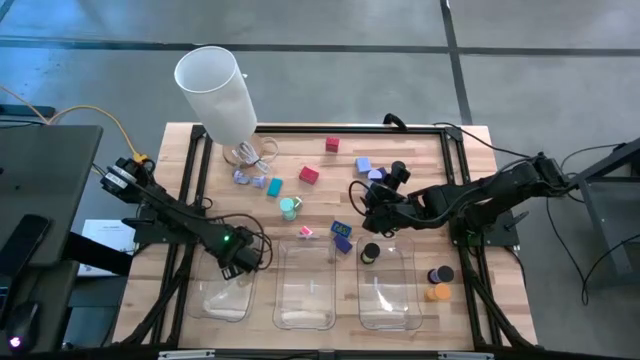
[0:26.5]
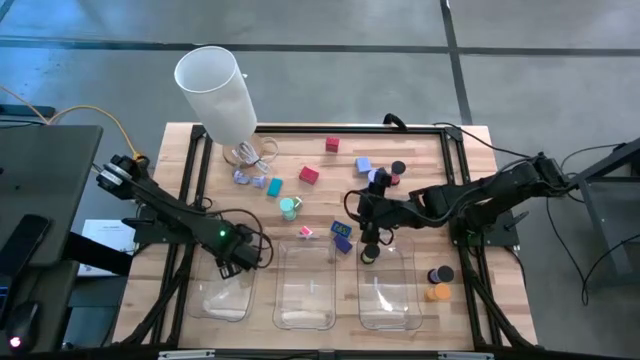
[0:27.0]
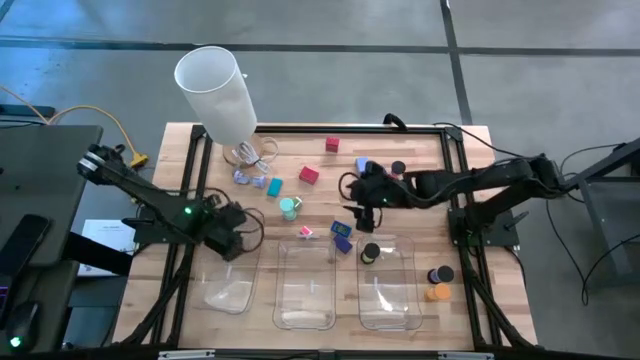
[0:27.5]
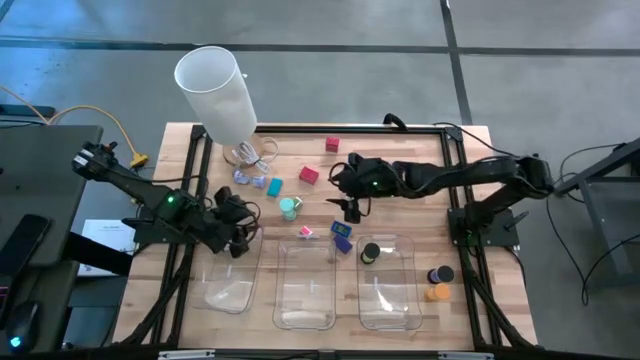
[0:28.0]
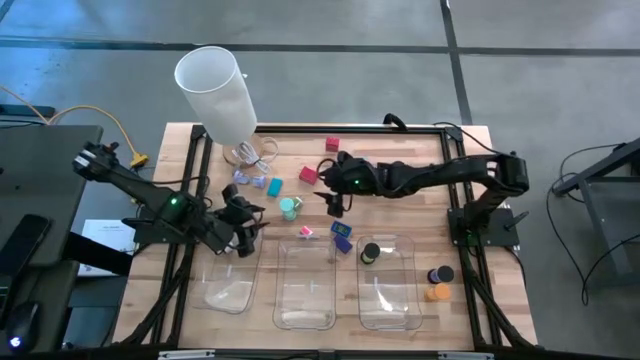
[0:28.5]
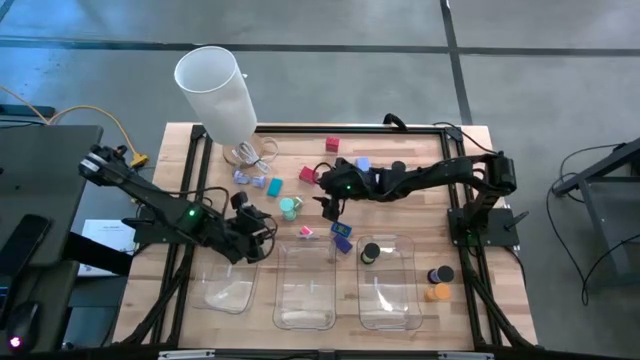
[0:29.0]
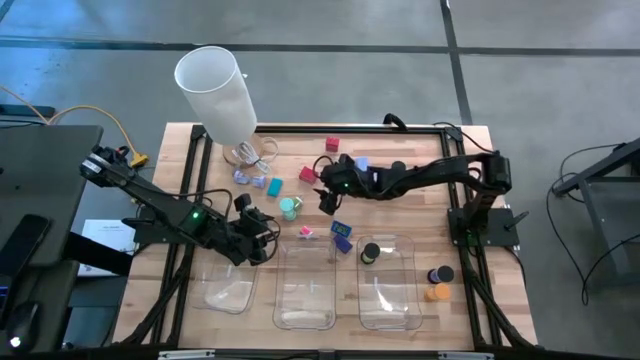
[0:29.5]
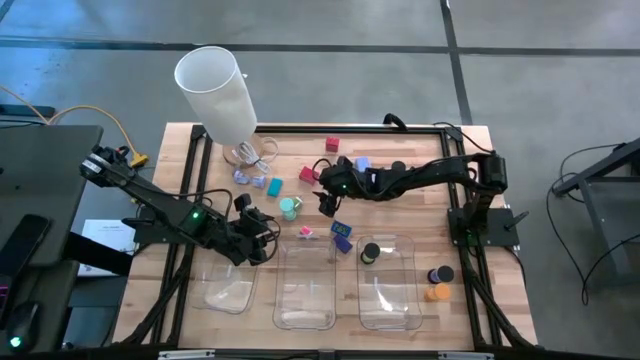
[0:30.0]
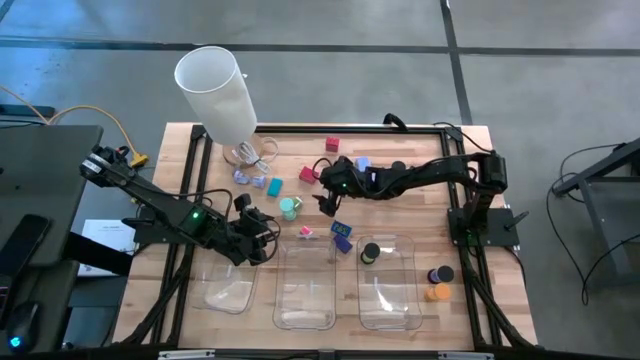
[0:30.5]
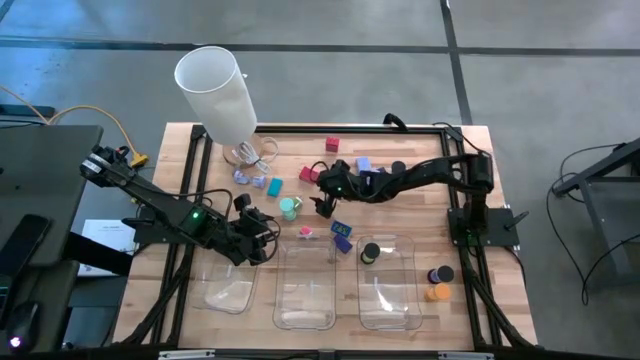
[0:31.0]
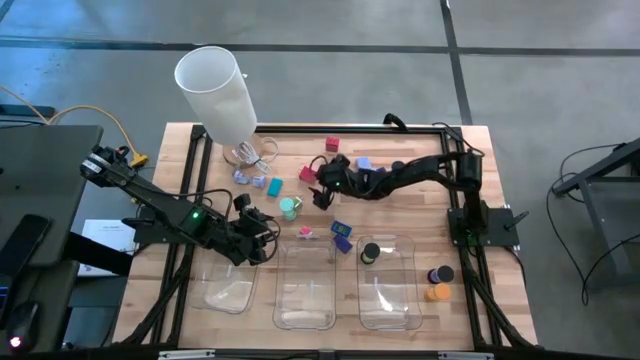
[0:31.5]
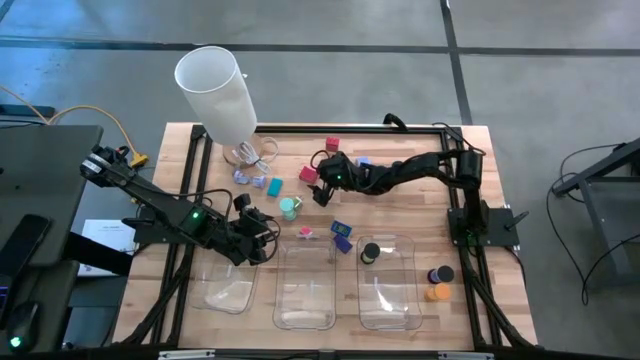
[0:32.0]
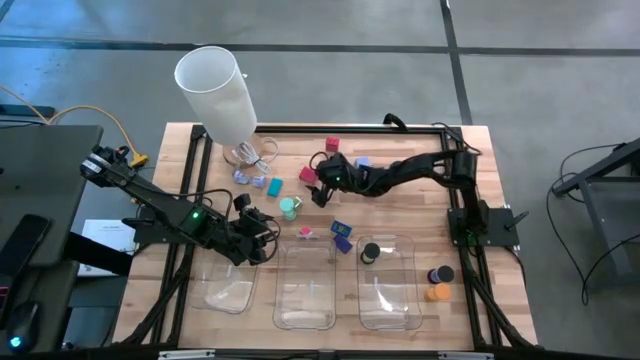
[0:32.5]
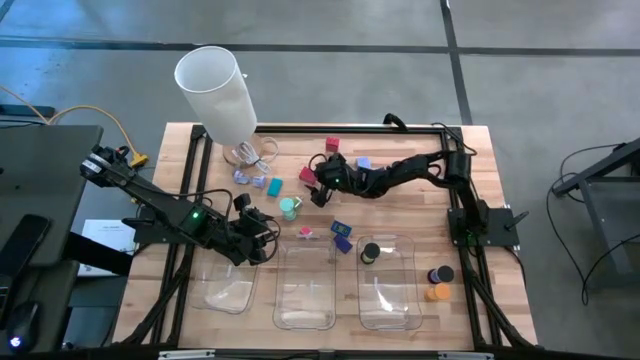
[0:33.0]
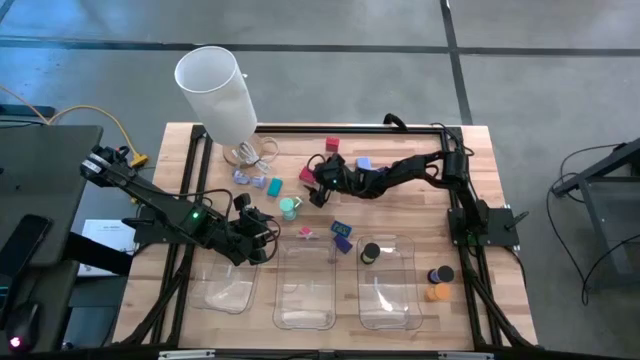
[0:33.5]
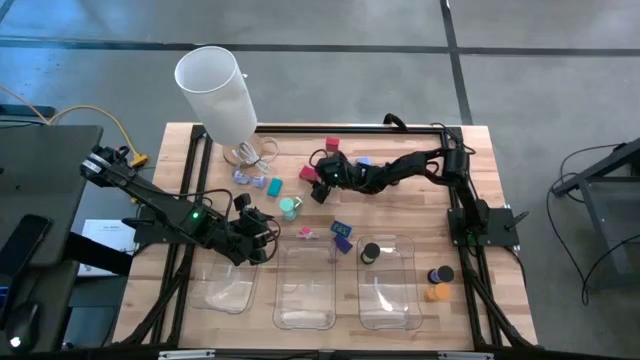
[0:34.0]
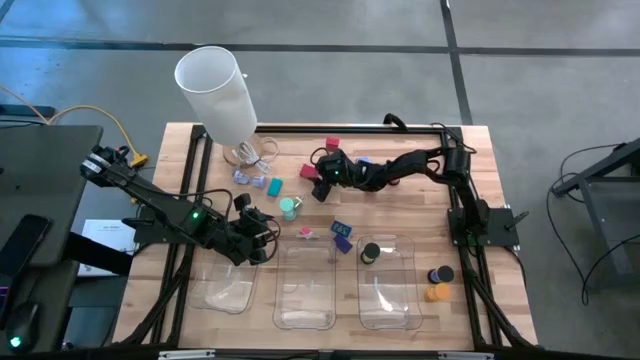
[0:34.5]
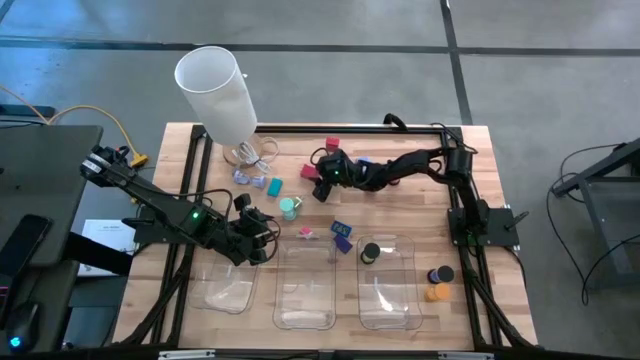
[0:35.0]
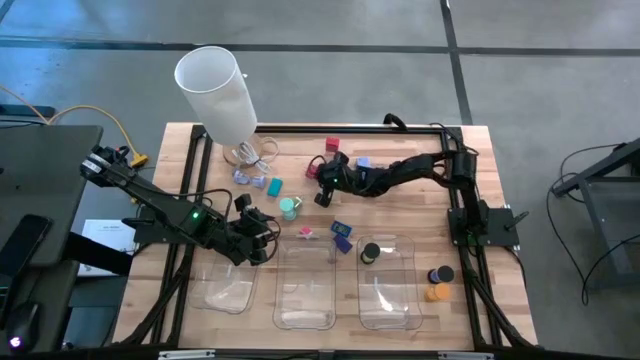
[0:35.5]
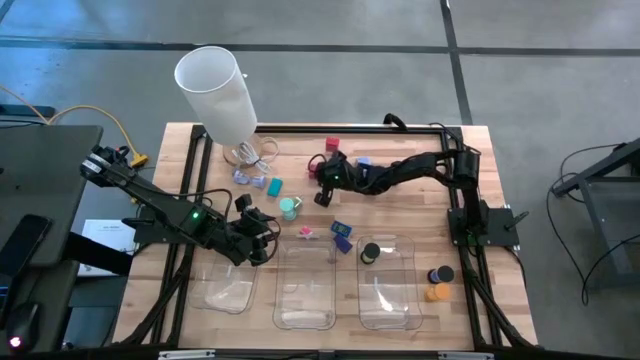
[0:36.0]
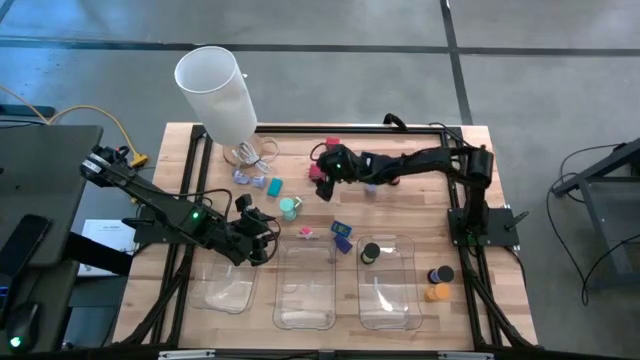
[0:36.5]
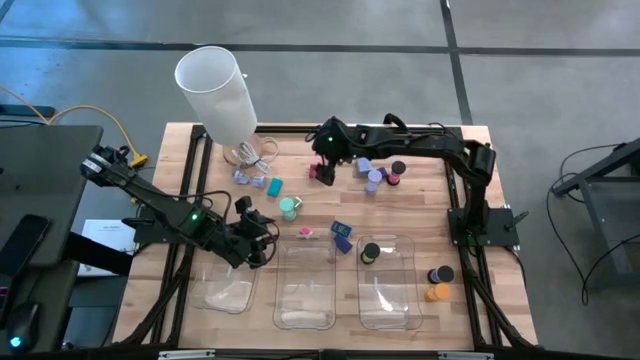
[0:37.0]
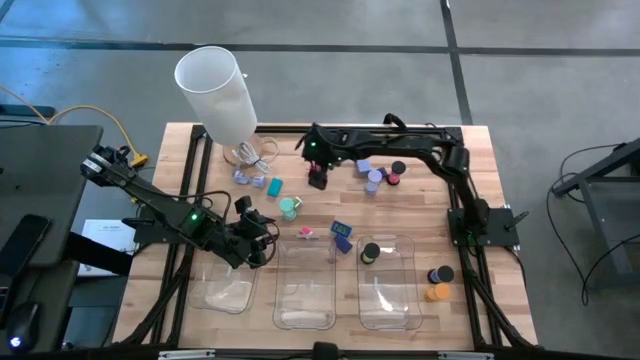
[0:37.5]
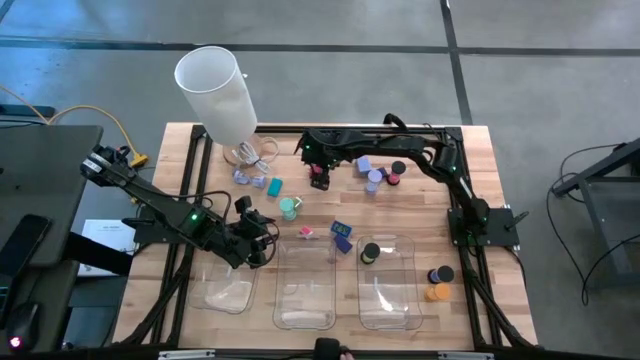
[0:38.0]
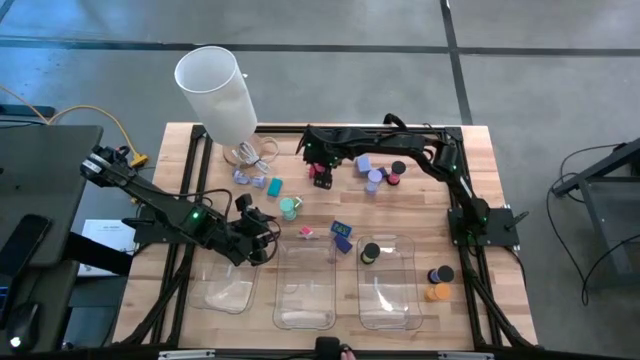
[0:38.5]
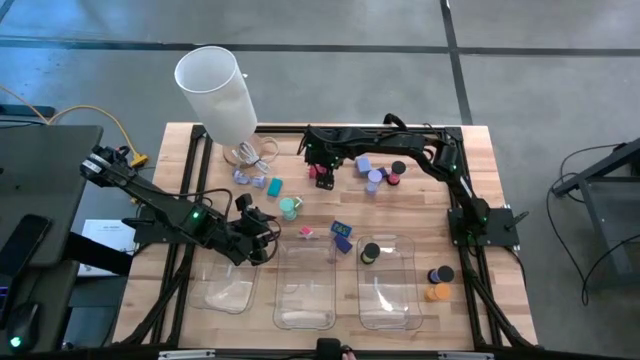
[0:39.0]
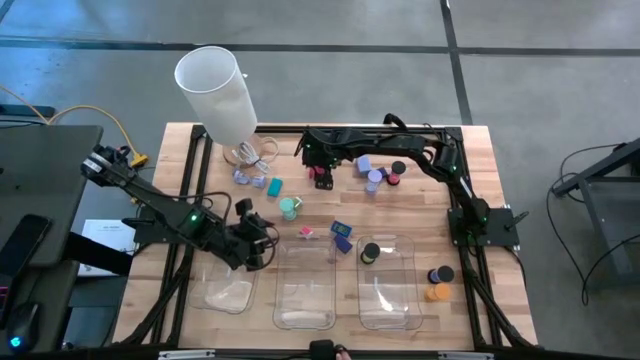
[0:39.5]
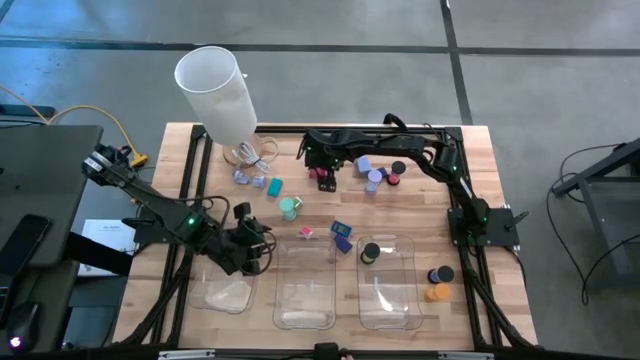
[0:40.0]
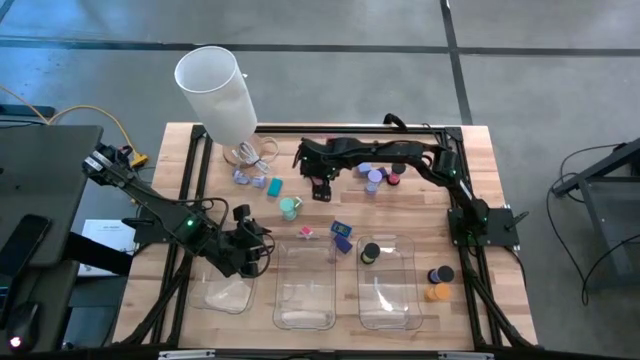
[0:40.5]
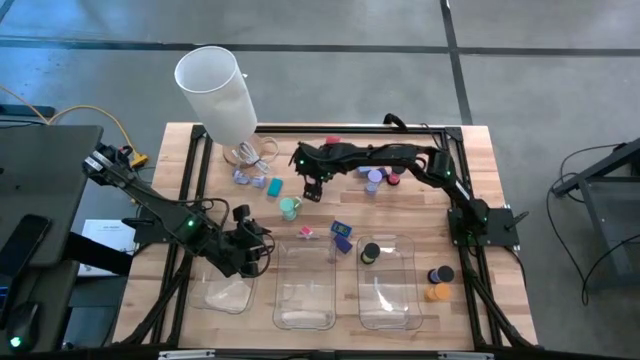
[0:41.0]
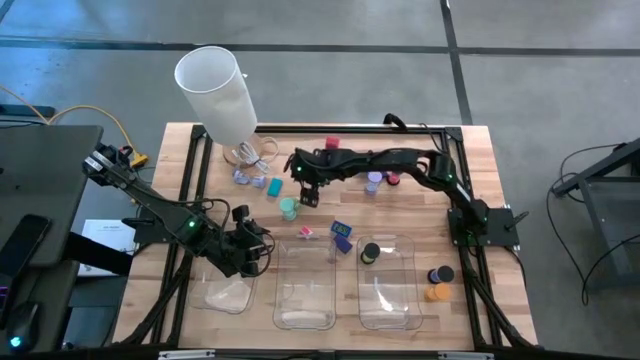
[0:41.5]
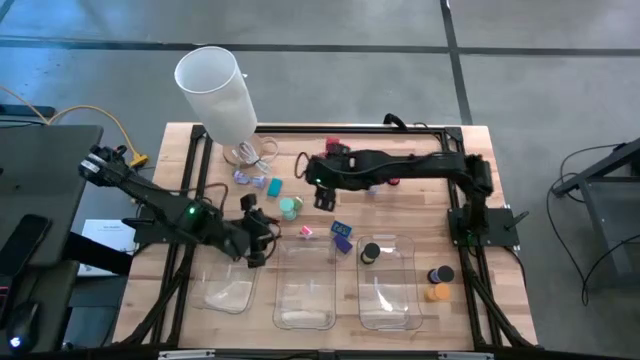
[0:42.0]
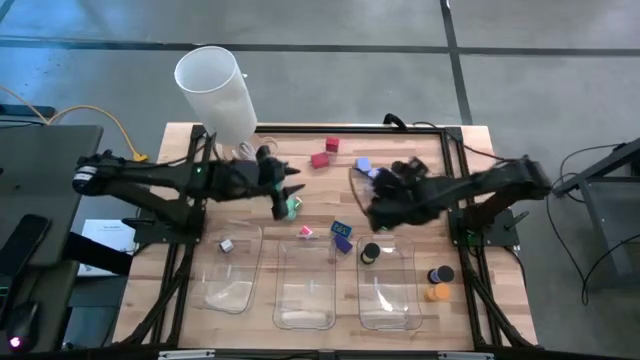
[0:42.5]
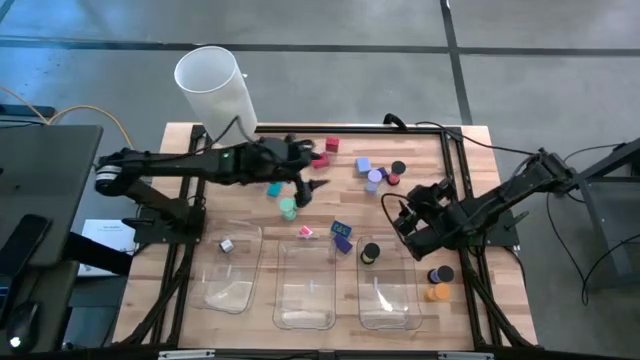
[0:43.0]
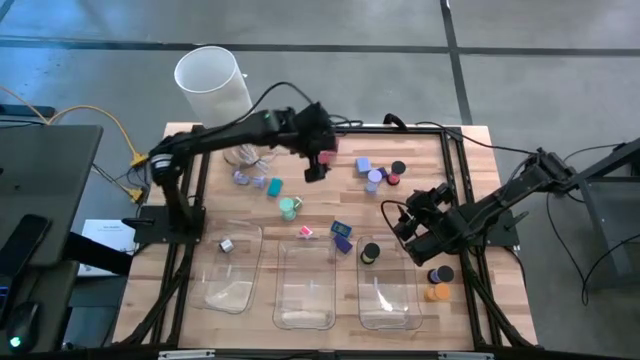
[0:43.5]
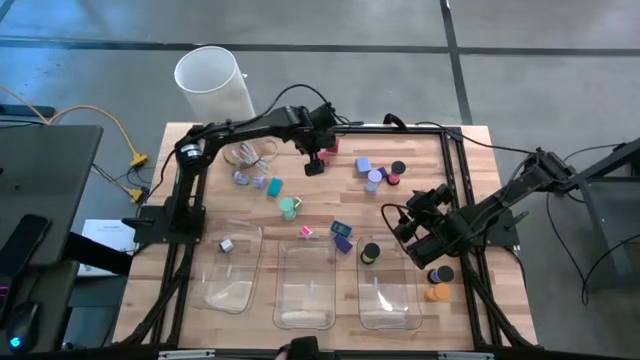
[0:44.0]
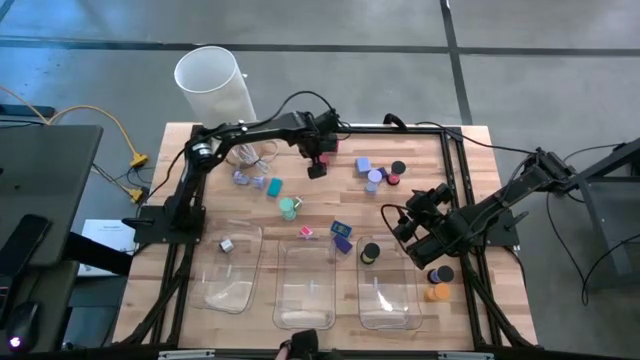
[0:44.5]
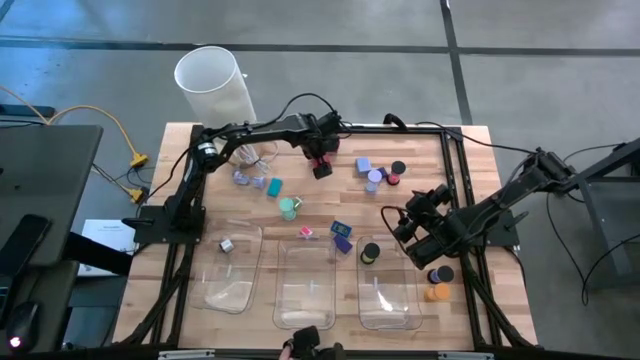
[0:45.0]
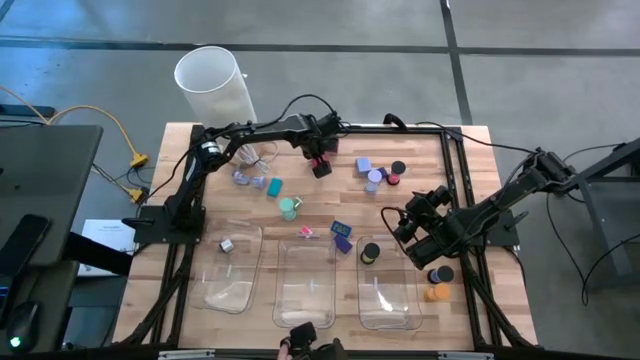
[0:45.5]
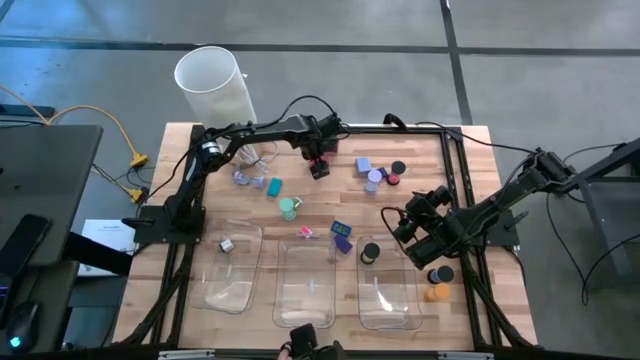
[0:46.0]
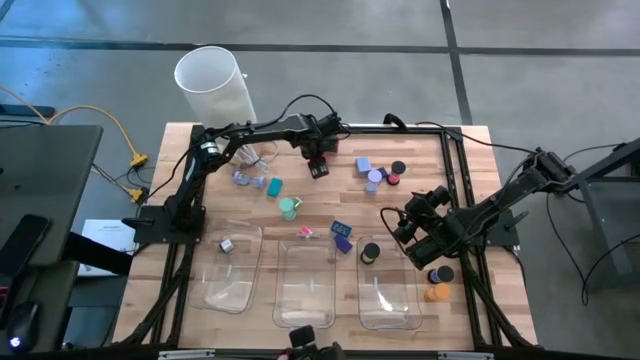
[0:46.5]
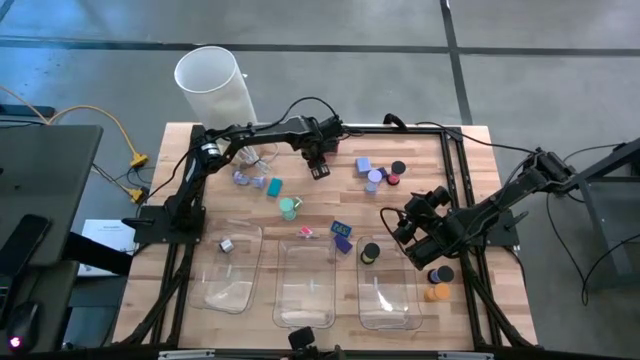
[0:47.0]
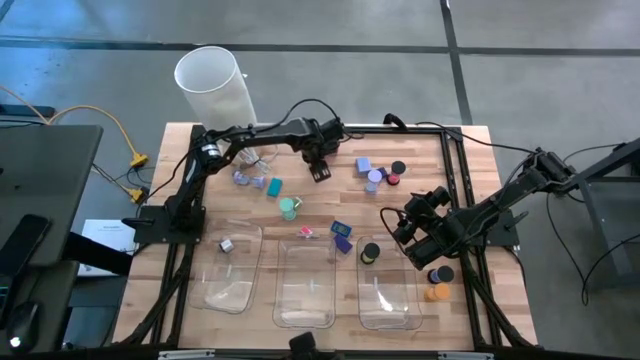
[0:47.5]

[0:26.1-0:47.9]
Task: Pick & Place Office items
Put the middle red adapter into the left bin
